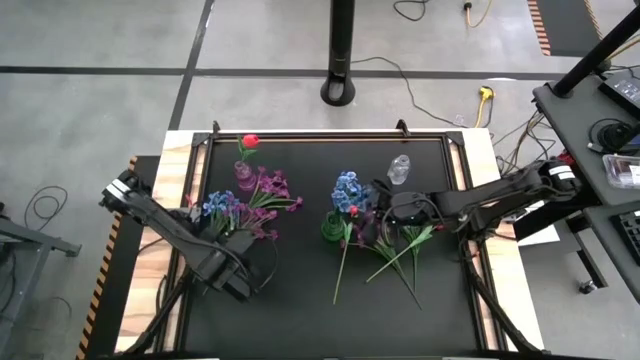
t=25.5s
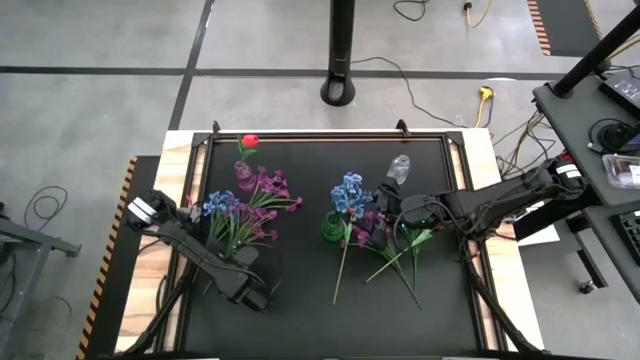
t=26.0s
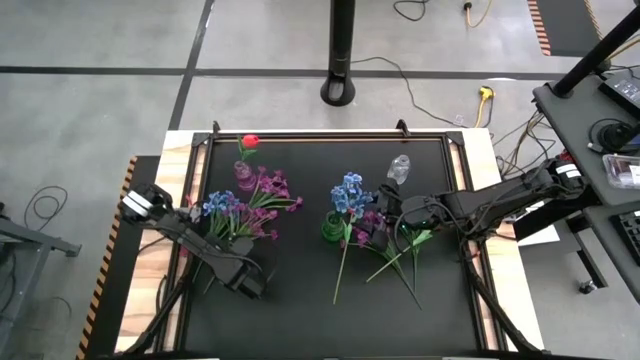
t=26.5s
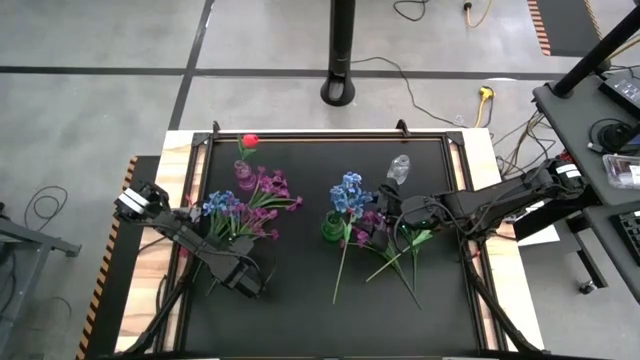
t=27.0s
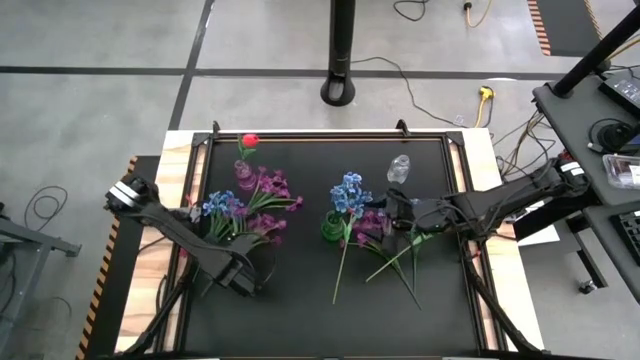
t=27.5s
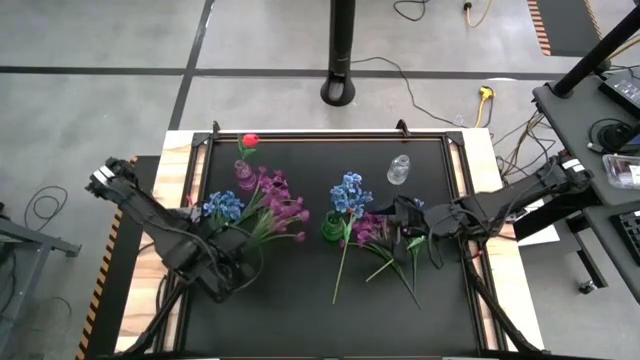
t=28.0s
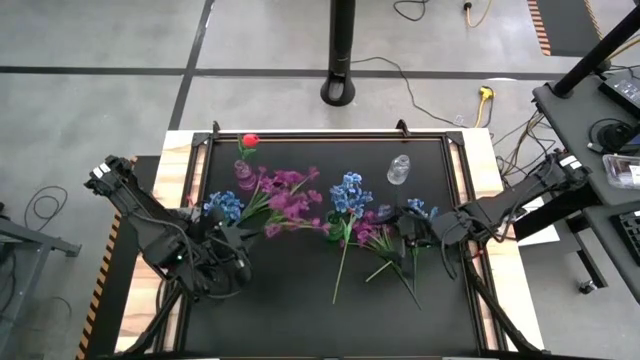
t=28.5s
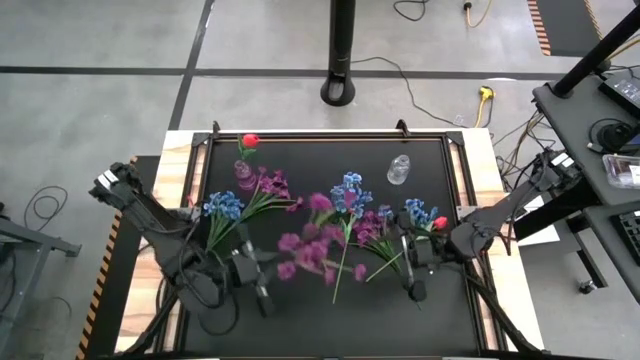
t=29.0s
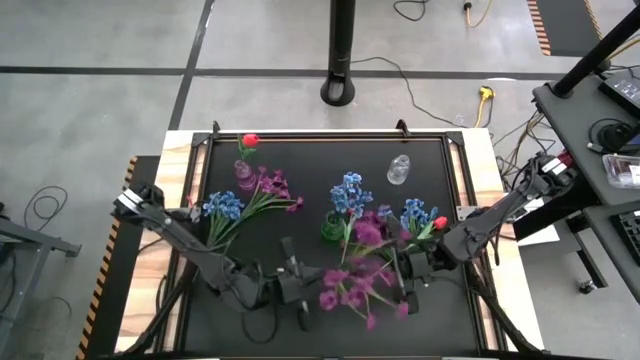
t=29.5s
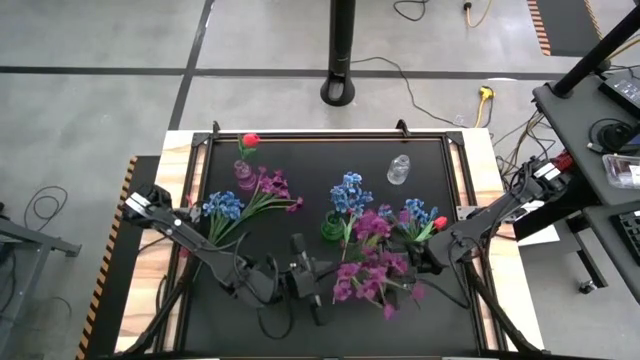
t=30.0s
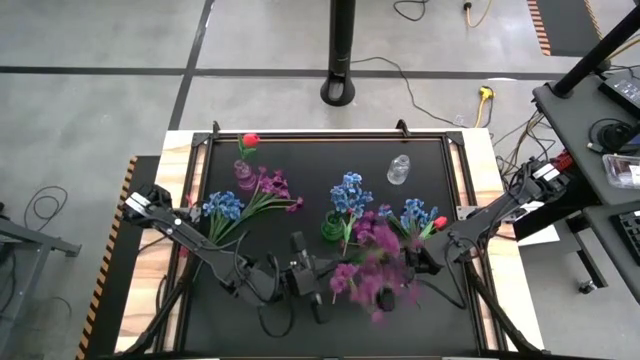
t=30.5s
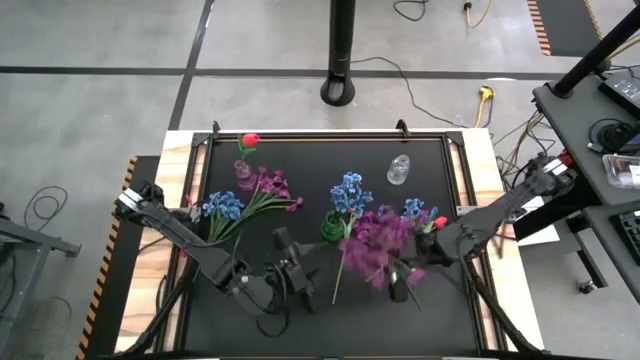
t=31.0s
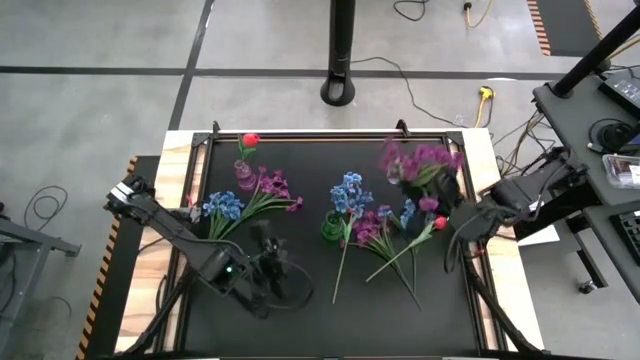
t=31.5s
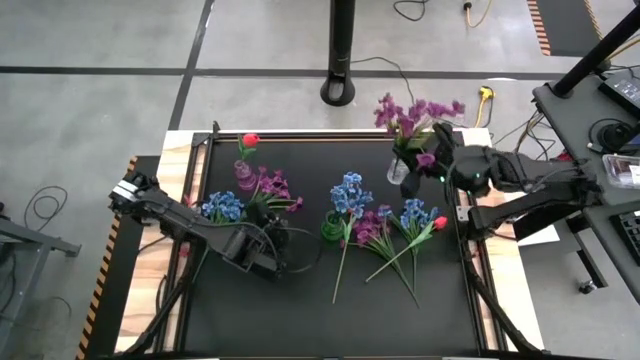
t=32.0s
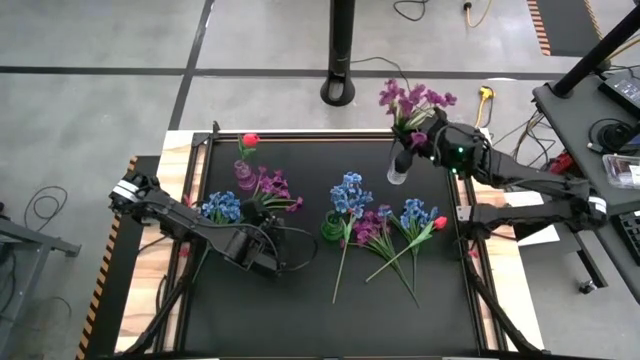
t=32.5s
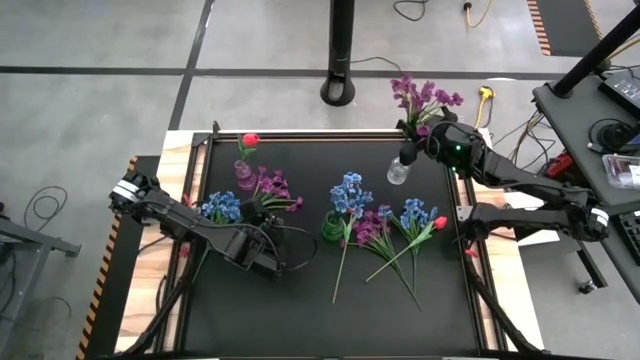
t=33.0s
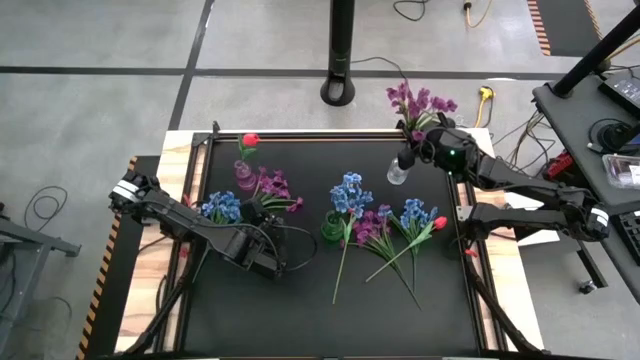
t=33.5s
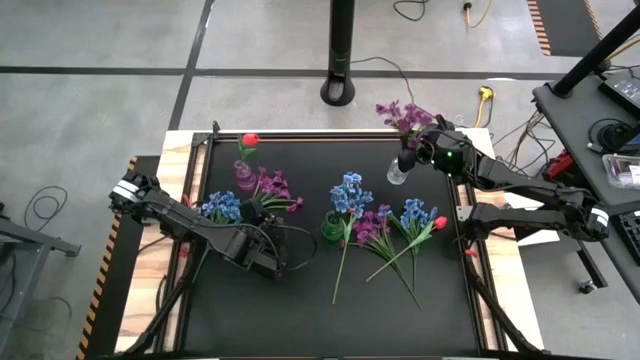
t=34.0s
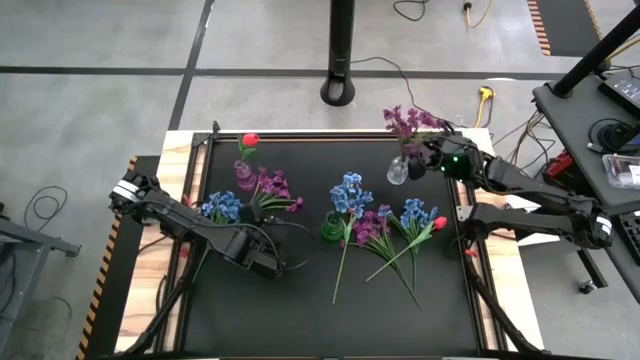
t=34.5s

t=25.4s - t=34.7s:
Task: Sort flowers into vase by color
Put the bottom left violet flowers into the transparent vase

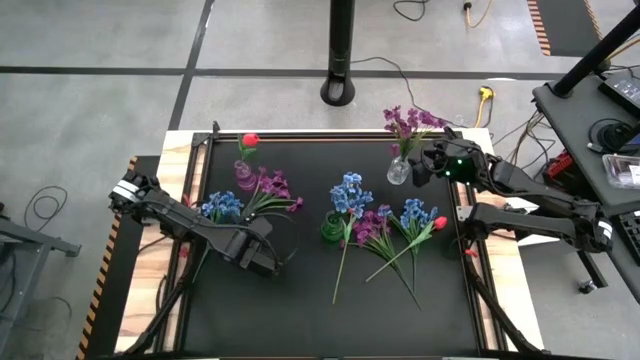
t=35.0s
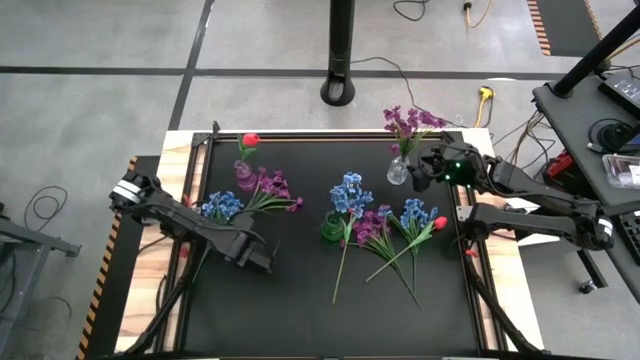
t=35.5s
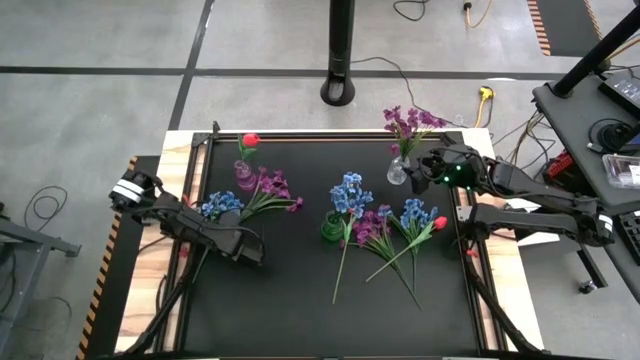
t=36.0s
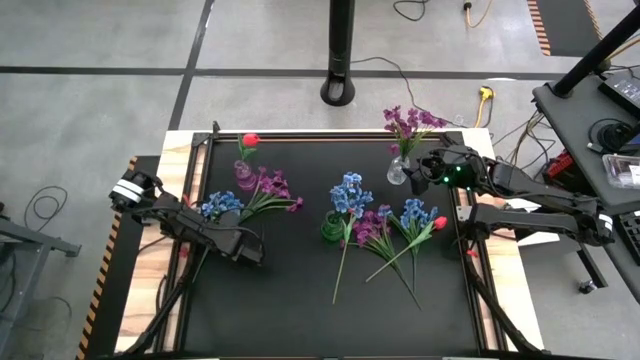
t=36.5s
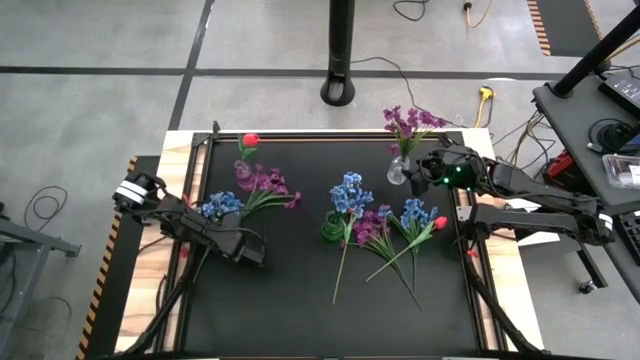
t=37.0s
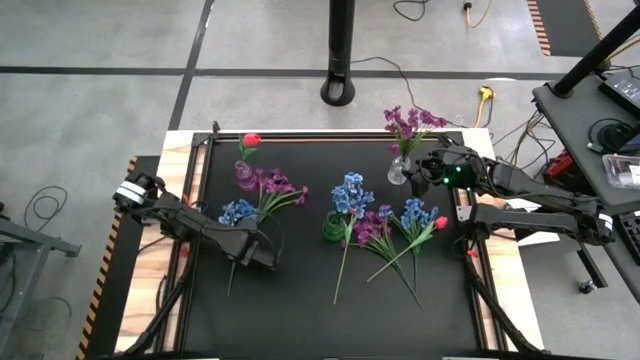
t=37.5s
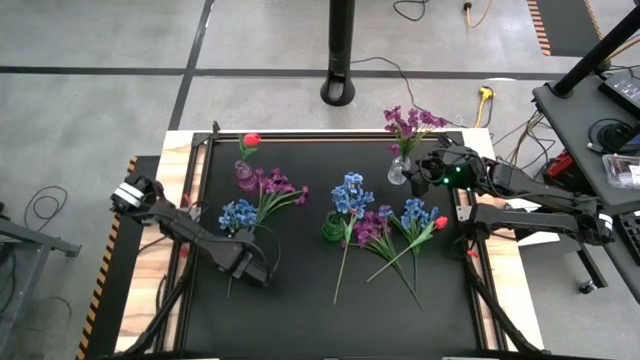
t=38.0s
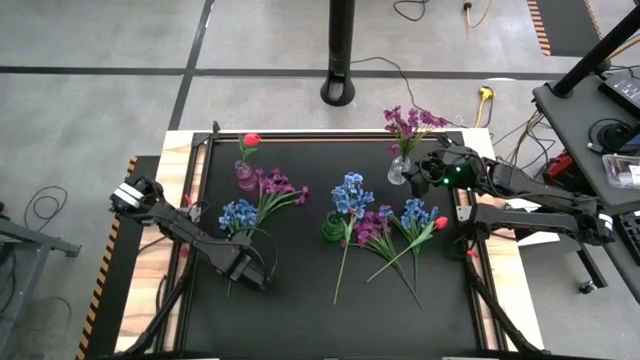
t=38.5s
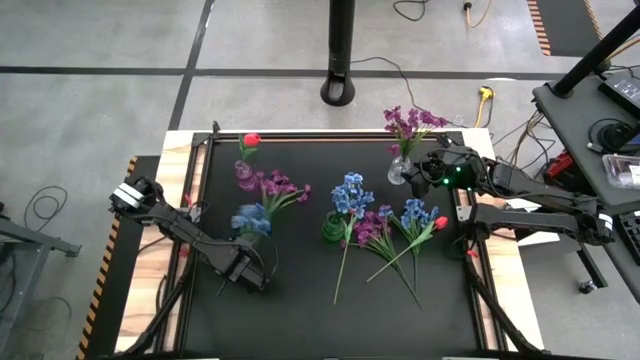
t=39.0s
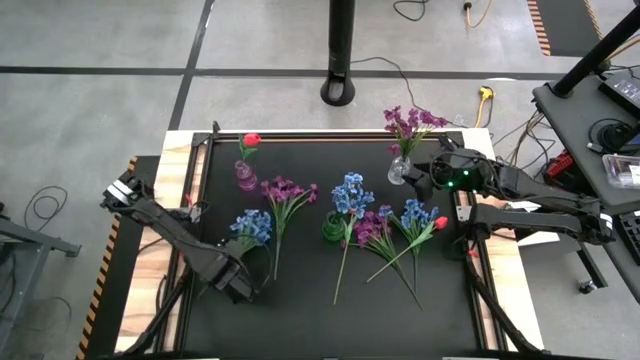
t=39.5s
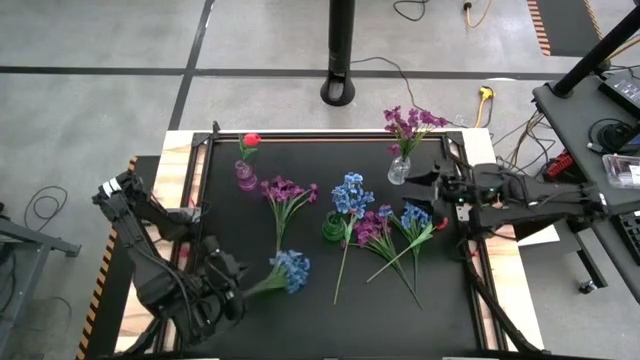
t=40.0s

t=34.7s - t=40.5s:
Put the middle left blue flowers into the green vase

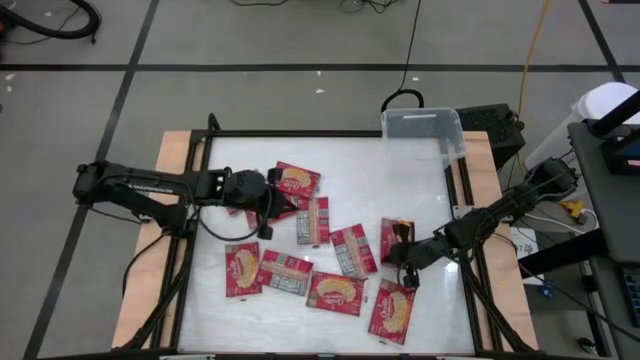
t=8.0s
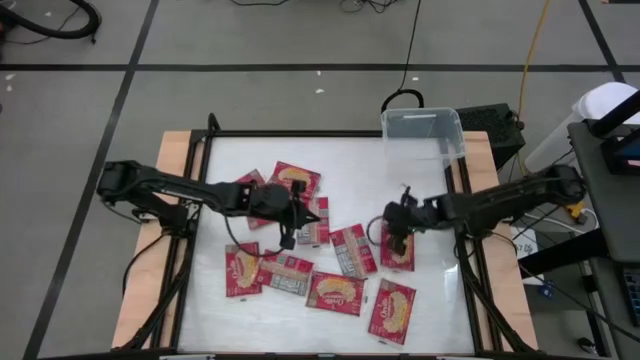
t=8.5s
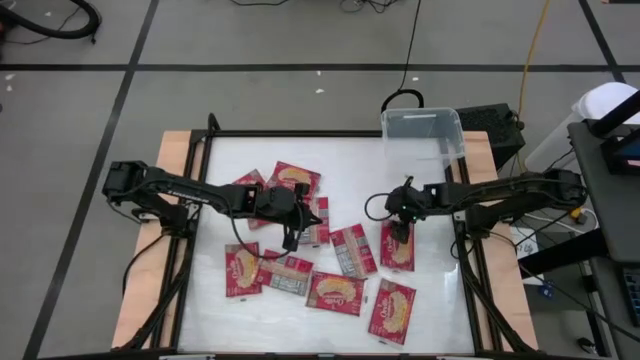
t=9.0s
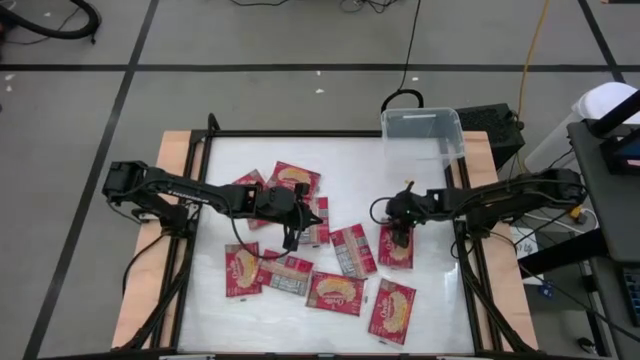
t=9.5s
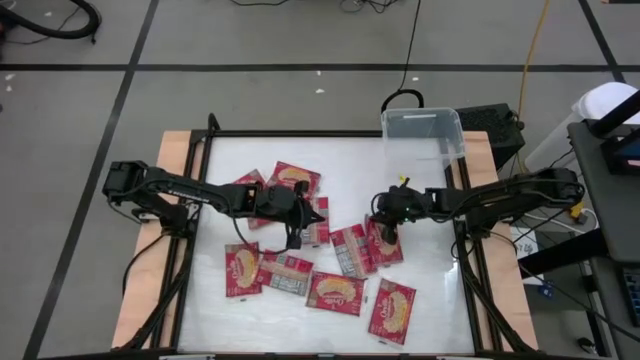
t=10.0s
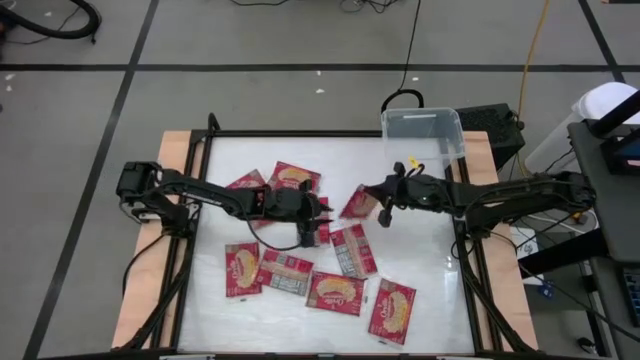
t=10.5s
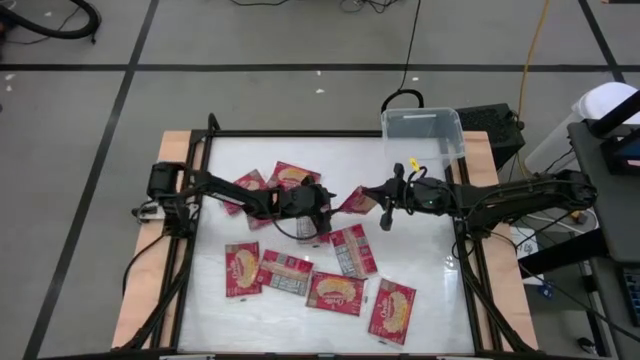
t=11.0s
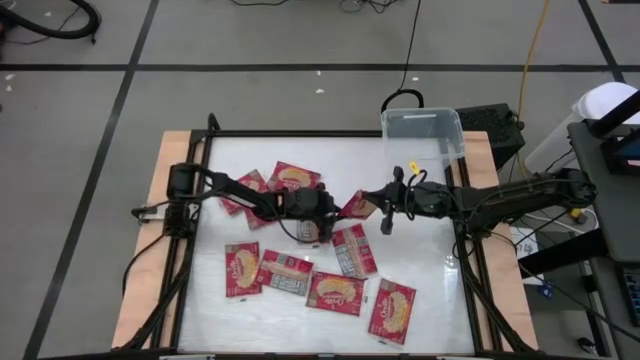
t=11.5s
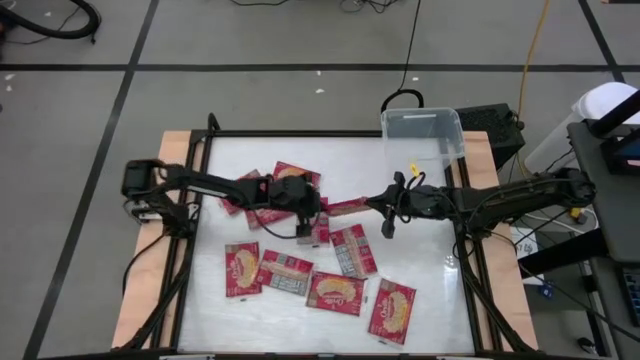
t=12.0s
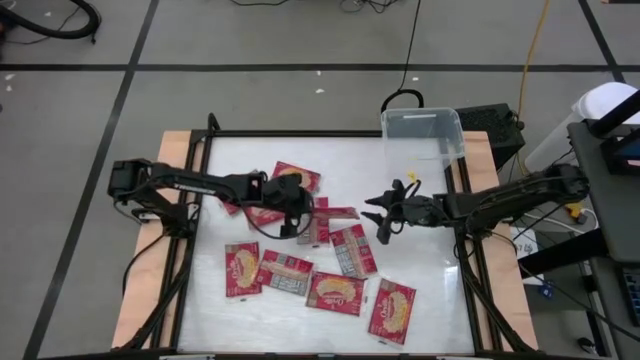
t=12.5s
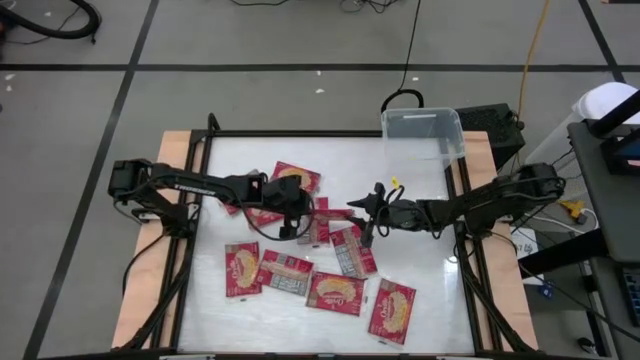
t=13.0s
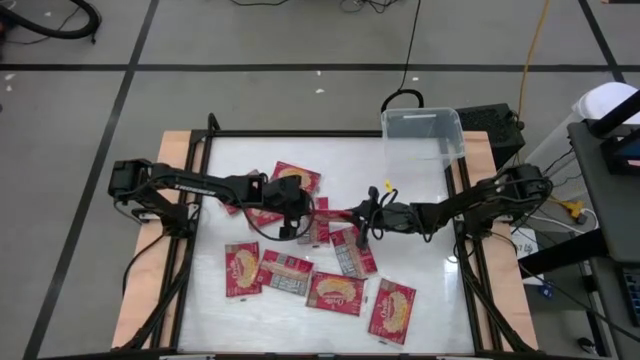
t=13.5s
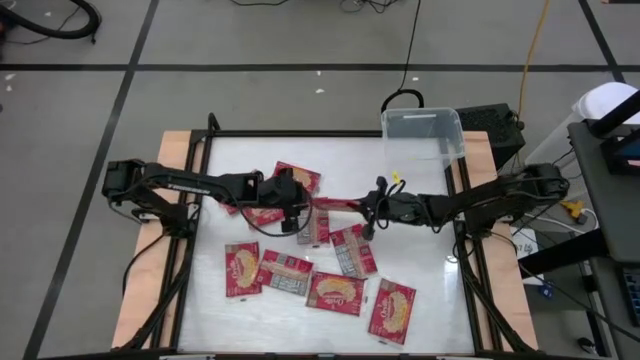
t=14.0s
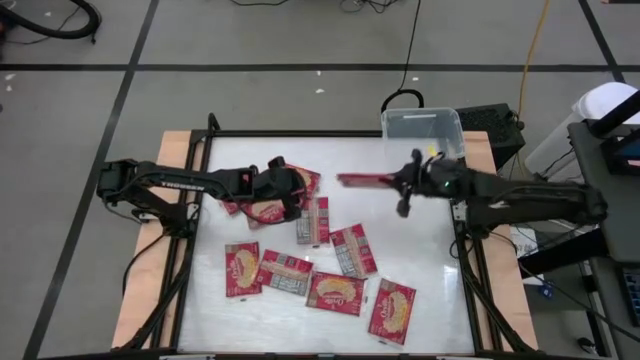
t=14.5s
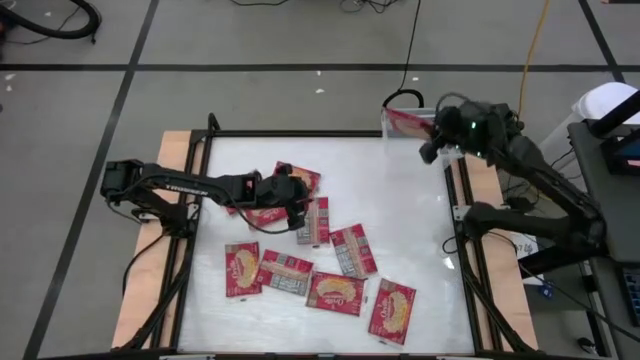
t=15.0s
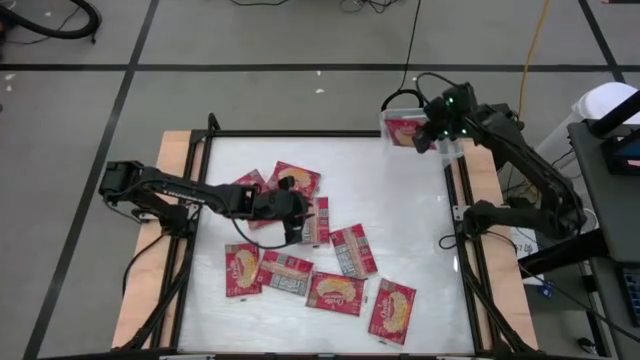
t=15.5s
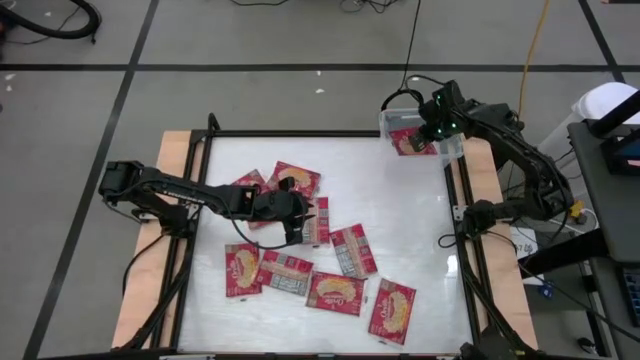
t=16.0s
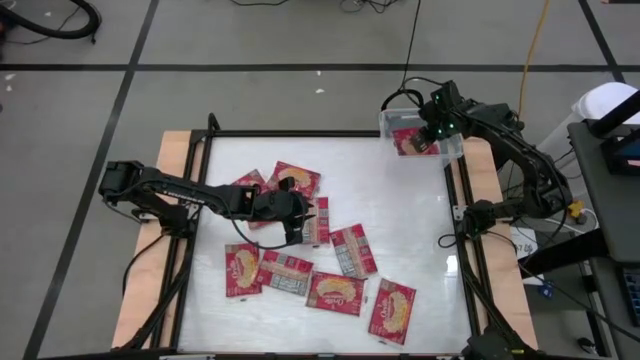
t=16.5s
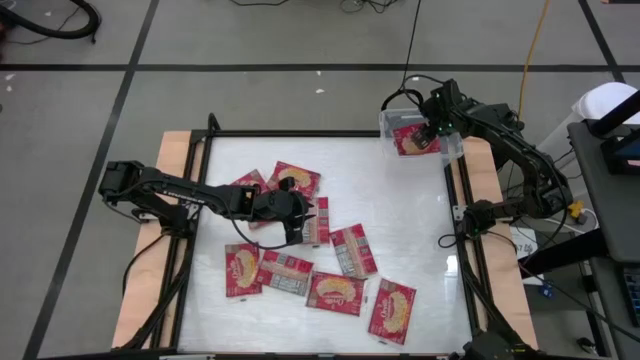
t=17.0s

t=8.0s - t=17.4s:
Task: Sort popcorn bags into baskets
Put the red popcorn bag into the transparent bin
